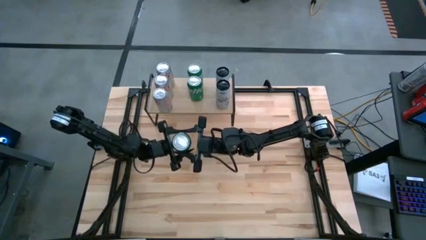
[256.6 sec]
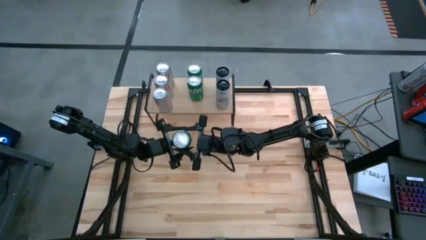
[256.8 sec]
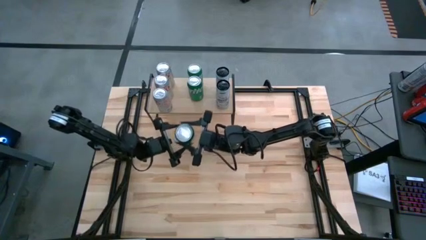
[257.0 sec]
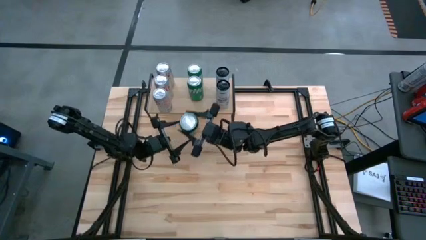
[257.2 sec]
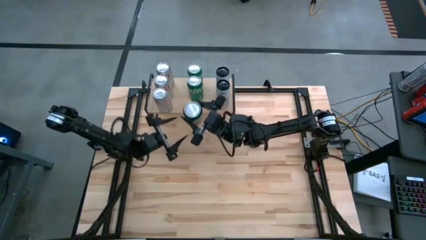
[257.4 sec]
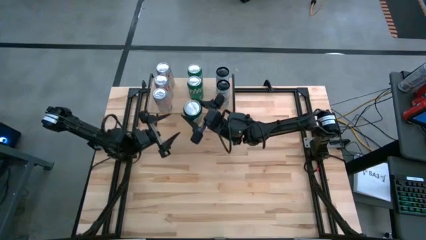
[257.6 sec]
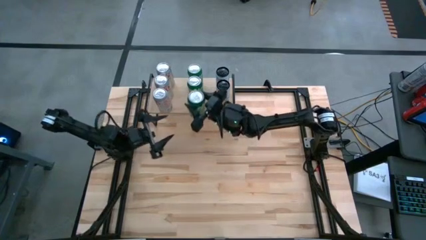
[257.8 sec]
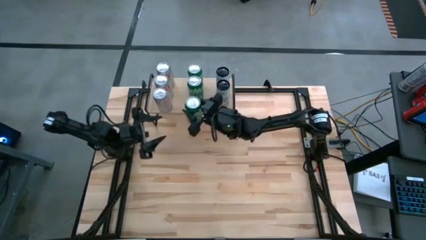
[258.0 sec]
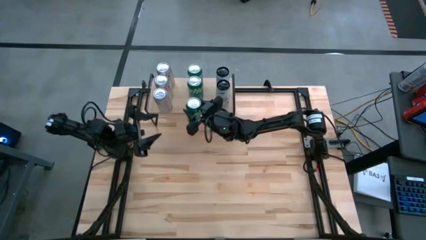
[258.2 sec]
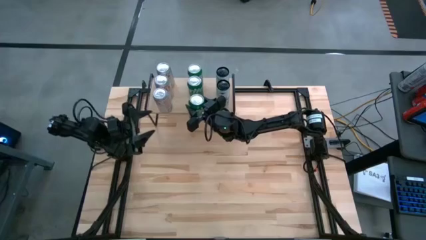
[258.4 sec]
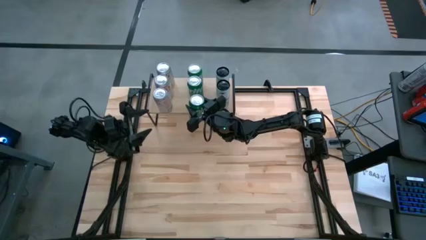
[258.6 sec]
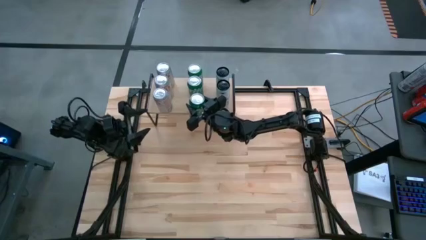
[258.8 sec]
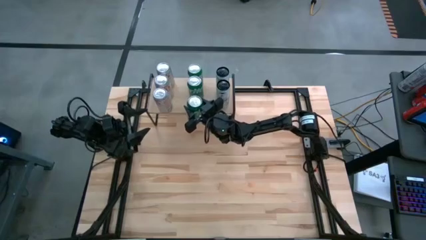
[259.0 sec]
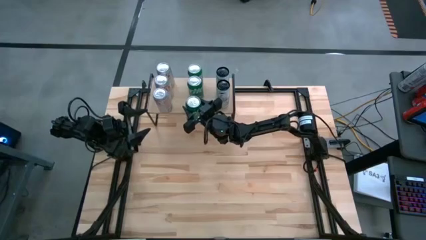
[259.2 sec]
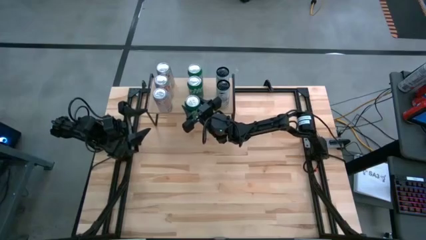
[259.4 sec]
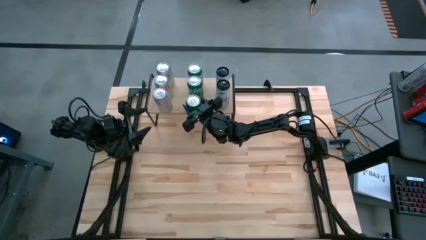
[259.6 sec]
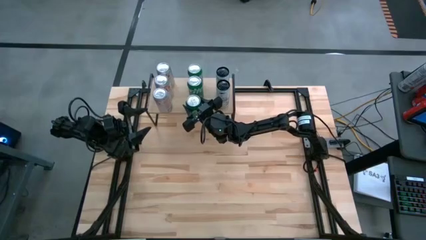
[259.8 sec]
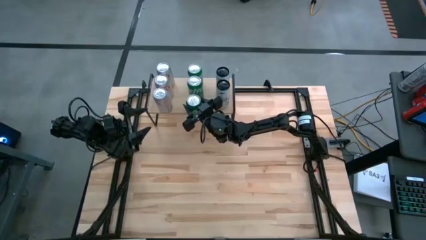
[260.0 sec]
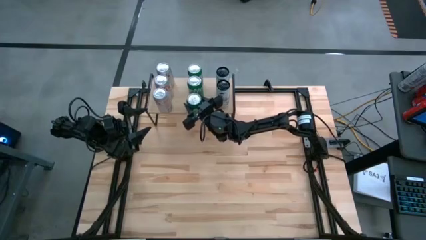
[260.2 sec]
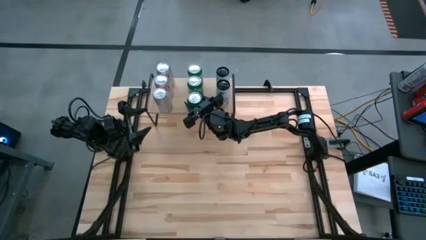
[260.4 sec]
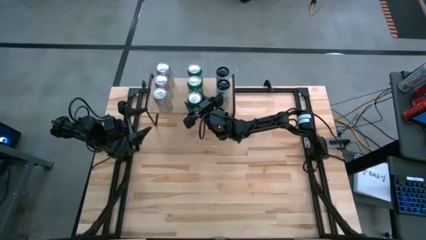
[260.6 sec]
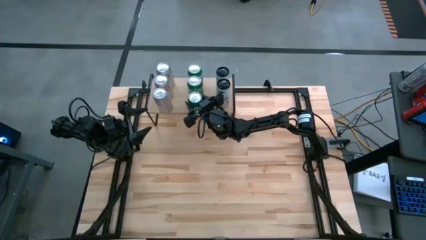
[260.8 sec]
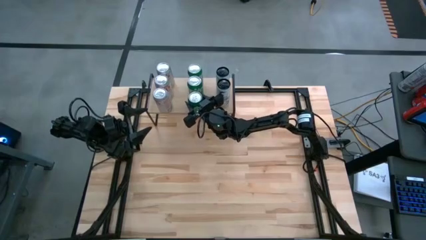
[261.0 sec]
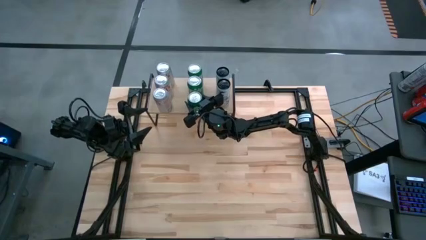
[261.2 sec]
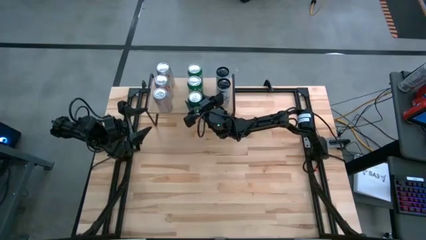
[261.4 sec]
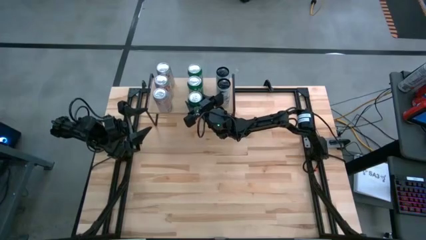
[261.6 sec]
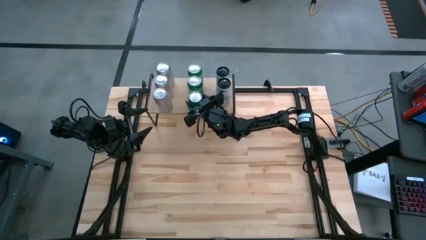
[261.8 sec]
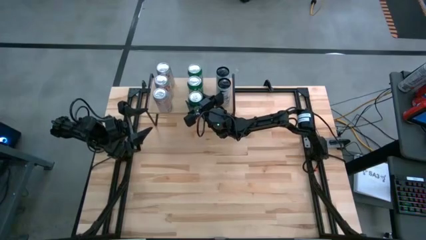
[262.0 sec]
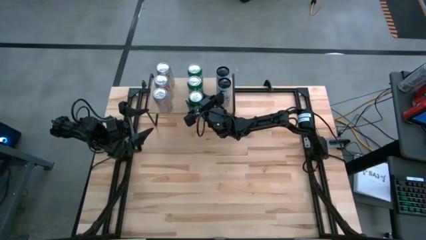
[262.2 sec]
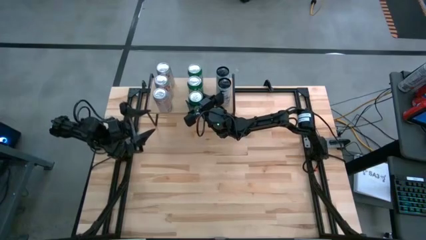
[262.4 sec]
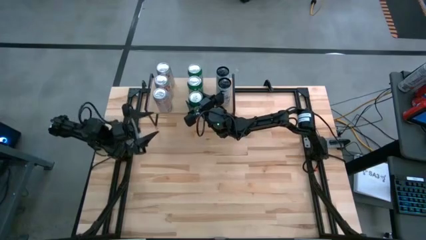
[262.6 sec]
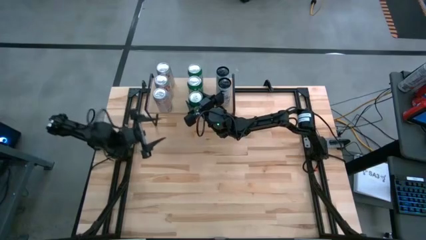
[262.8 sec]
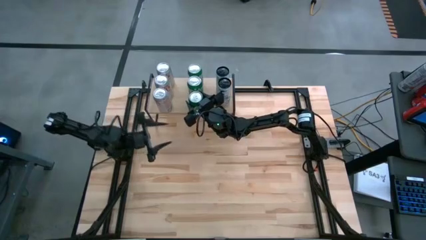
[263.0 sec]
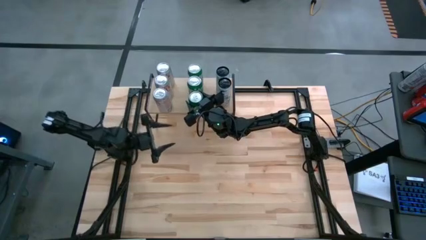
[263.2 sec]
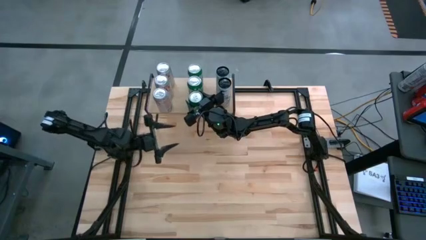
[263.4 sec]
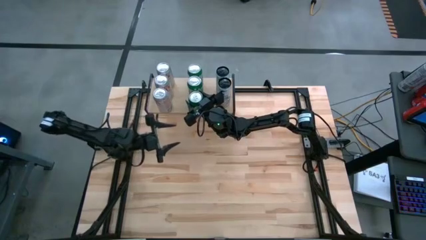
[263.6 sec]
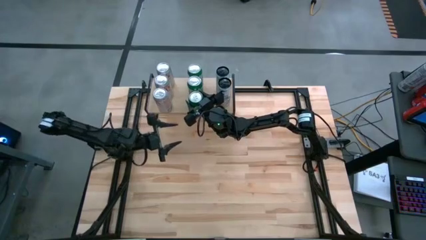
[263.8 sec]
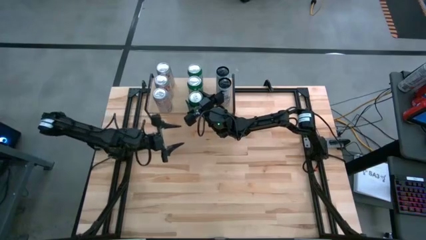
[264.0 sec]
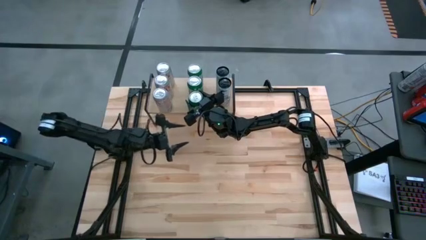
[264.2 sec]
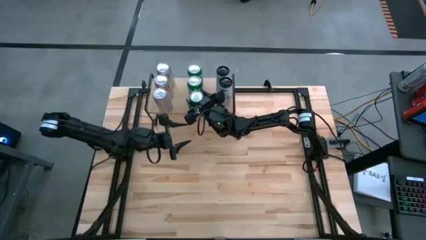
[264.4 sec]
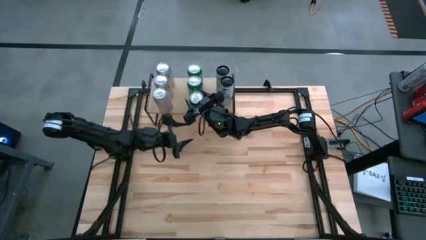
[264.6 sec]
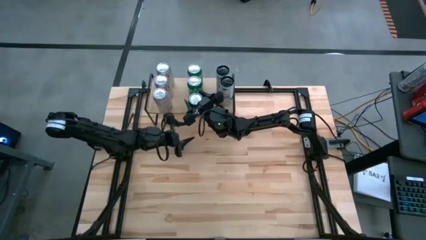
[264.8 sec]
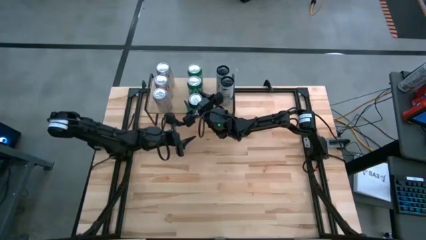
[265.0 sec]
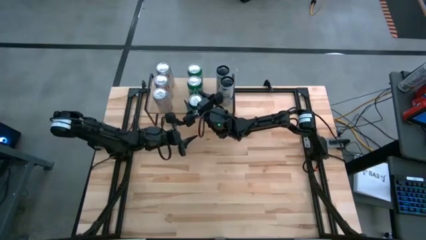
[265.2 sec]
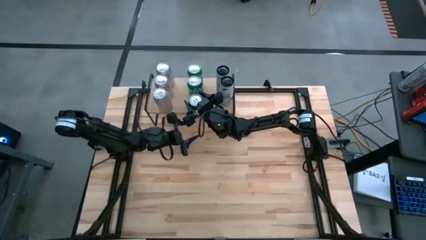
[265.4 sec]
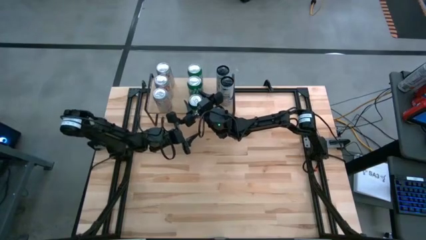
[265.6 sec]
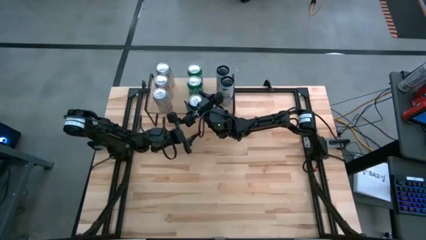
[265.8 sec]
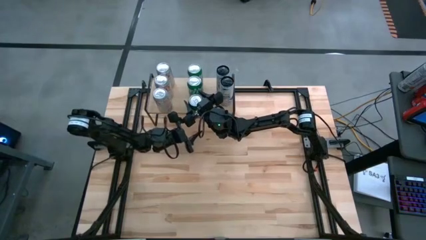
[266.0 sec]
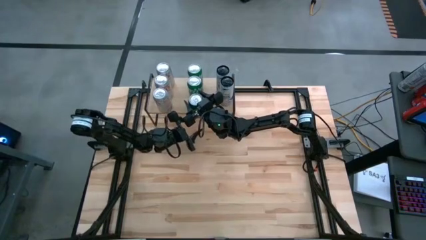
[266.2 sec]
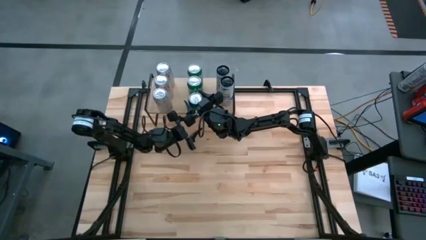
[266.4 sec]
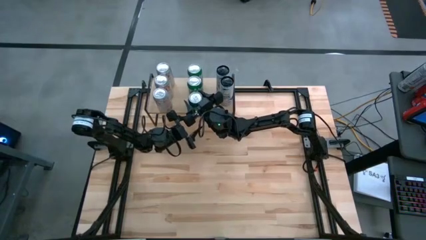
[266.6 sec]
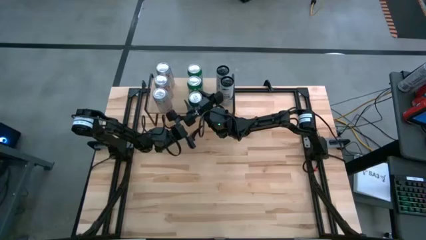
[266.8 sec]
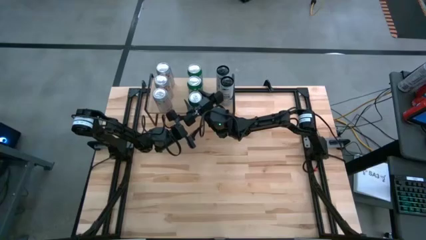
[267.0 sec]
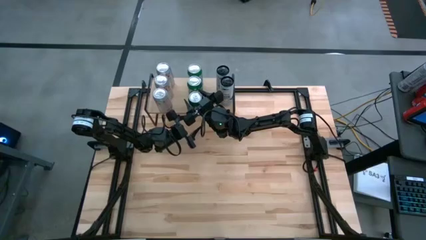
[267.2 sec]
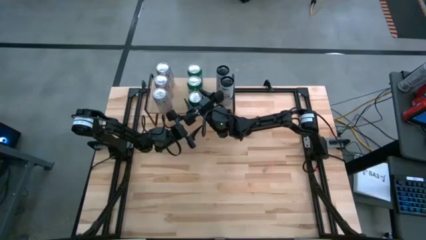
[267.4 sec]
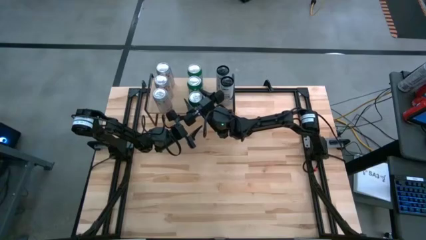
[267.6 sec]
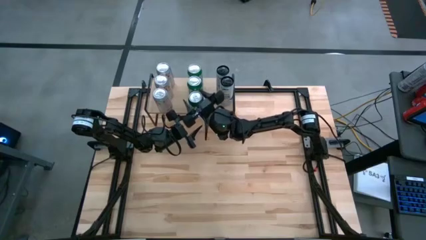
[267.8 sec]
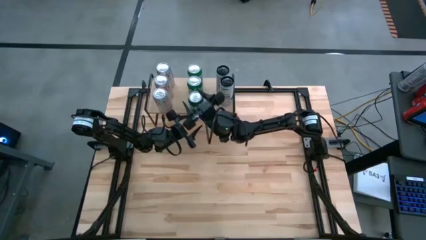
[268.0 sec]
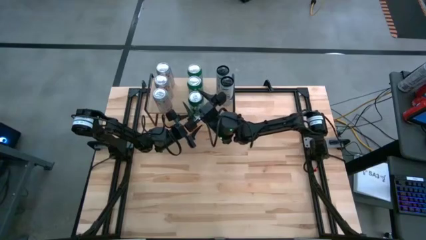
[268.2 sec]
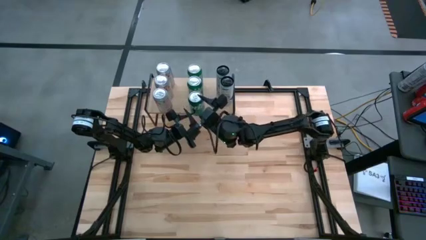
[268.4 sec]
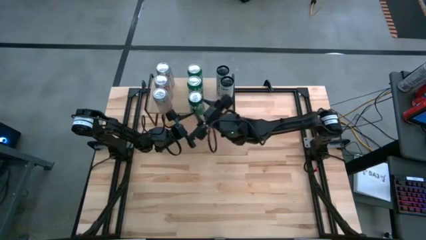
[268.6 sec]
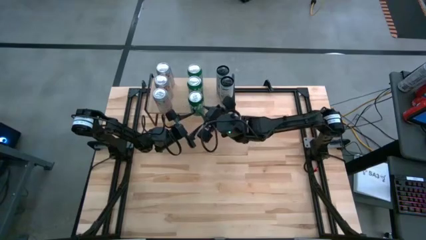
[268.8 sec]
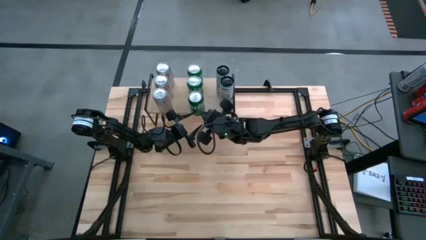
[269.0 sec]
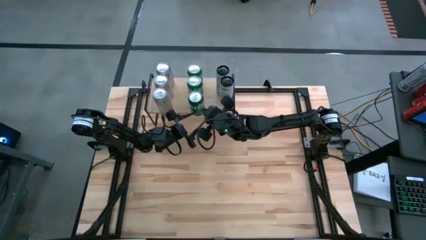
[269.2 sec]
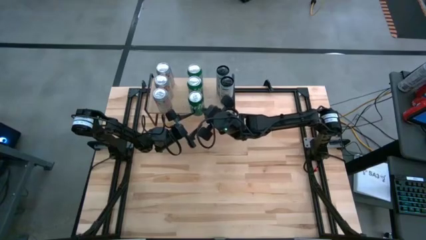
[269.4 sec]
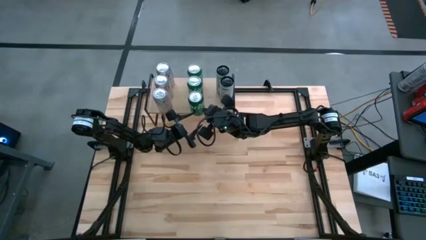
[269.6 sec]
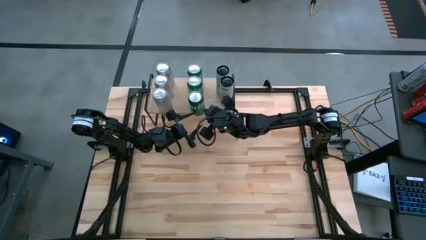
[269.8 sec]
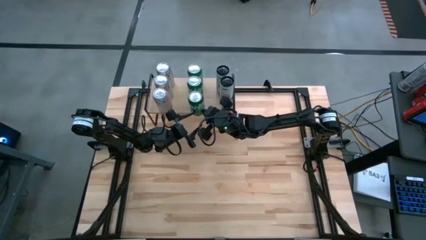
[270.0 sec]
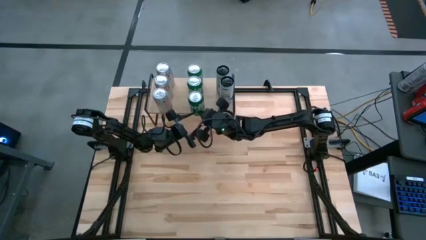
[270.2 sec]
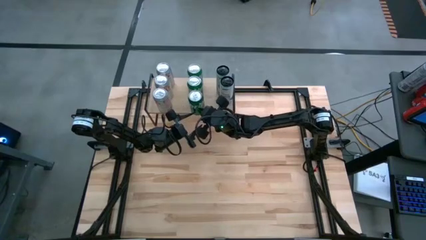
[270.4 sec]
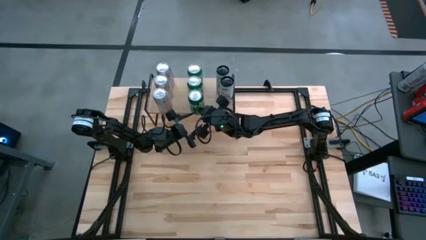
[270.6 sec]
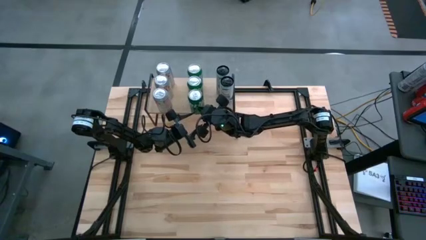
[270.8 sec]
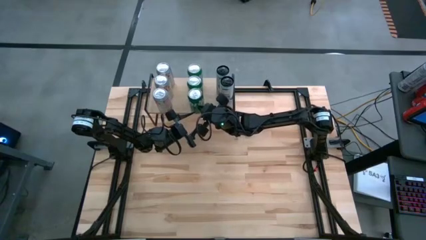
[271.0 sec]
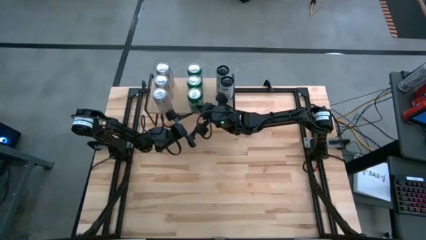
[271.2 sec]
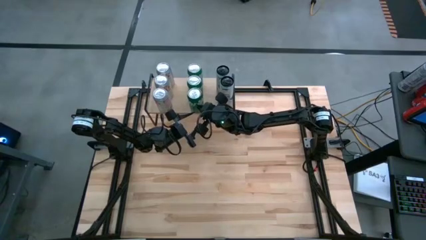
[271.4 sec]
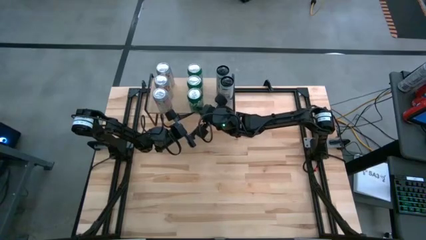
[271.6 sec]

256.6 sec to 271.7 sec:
Task: Place canned beverage on shelf
Put the green soda can aligned with the other green soda cans on the shelf

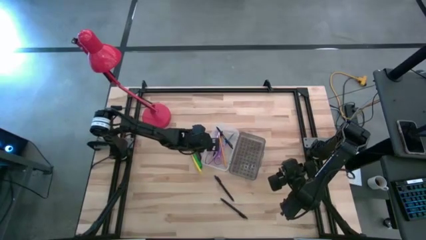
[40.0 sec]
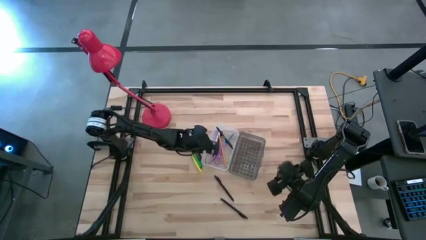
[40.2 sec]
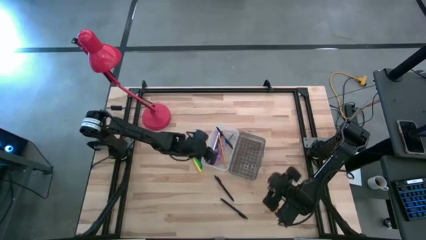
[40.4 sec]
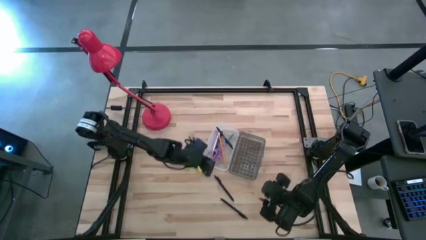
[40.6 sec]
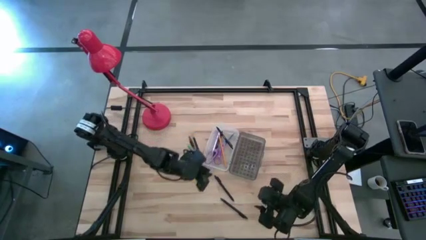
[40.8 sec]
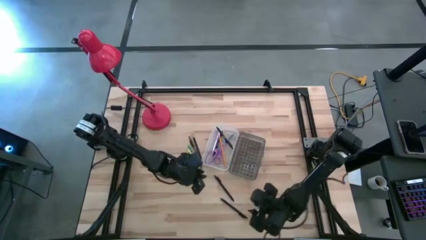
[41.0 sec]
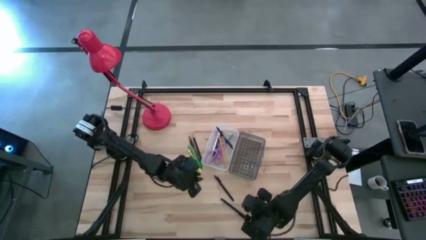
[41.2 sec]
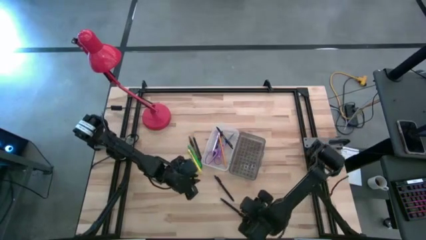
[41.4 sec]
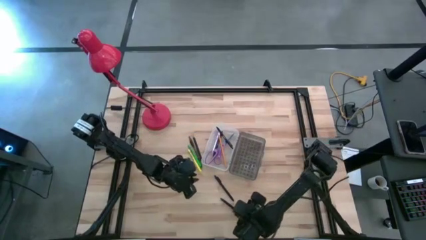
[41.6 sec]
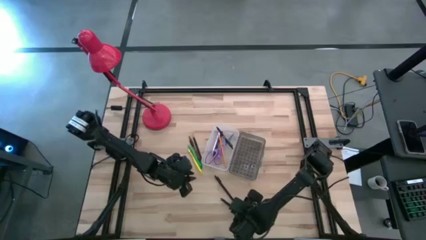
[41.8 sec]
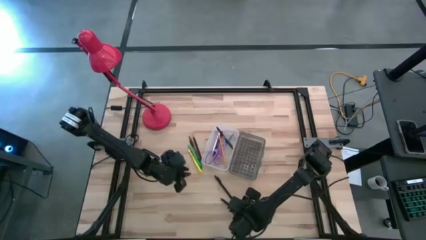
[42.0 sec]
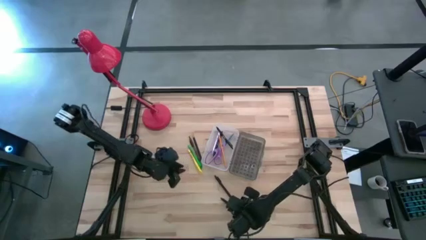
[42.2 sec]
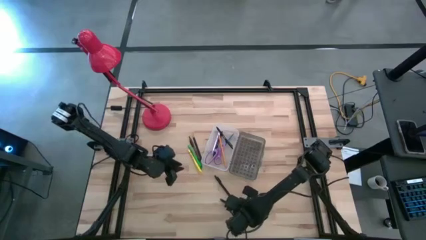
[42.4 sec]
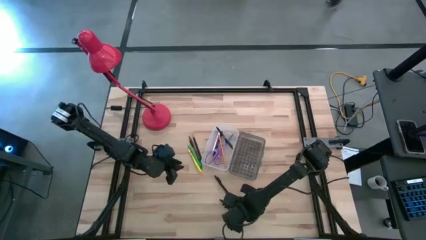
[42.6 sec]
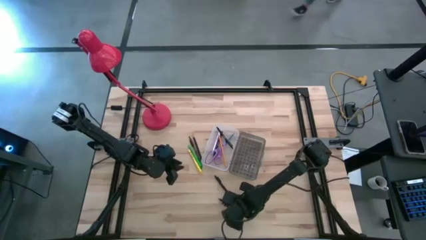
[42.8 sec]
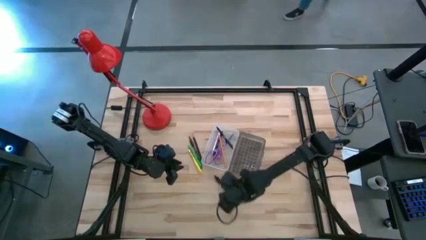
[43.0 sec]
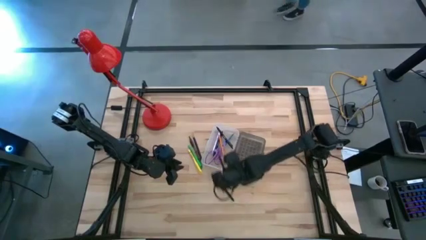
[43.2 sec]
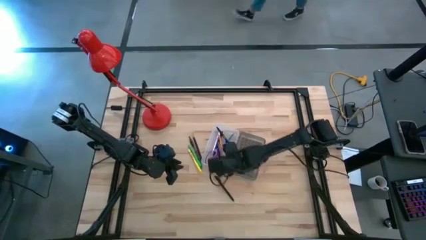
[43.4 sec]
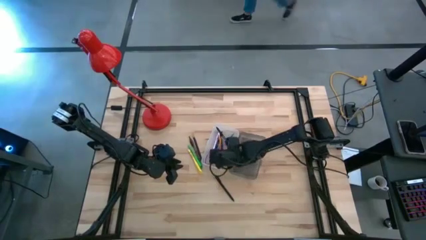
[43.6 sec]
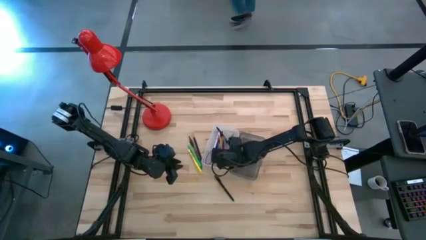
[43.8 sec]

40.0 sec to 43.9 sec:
Task: Pick & place school supplies into a supply box
Put the bottom black pen into the supply box
